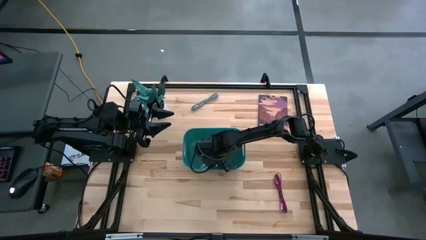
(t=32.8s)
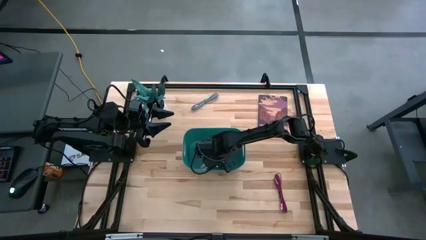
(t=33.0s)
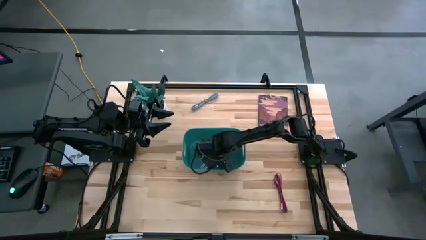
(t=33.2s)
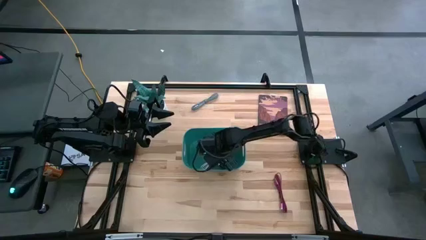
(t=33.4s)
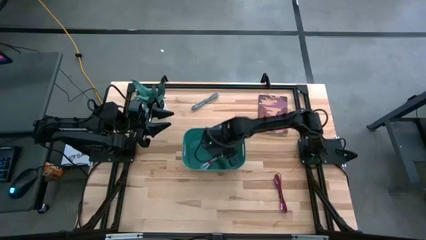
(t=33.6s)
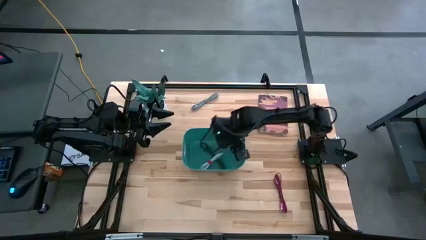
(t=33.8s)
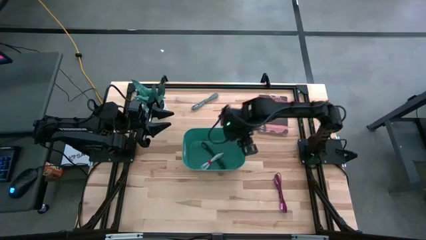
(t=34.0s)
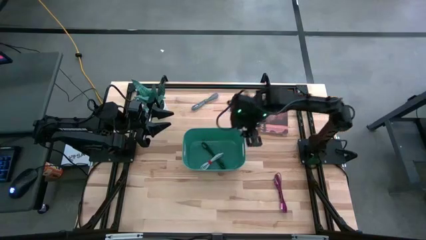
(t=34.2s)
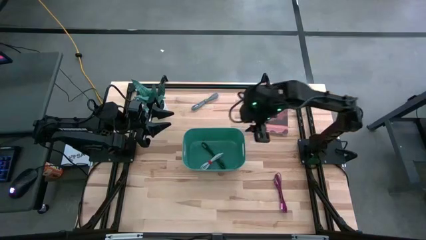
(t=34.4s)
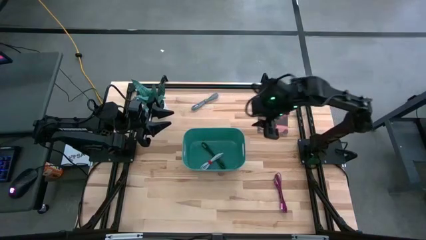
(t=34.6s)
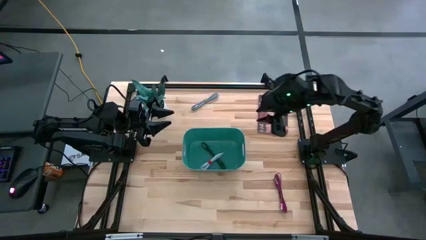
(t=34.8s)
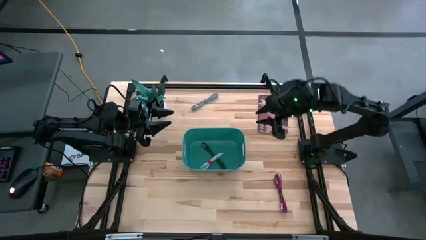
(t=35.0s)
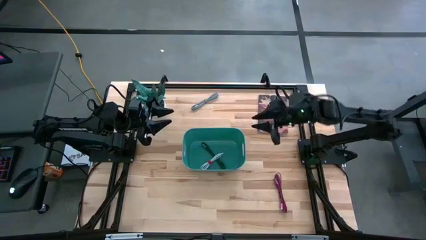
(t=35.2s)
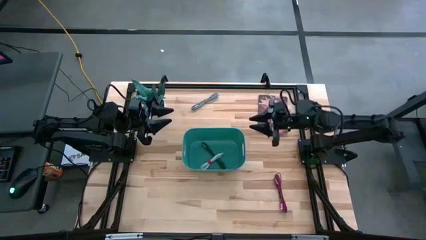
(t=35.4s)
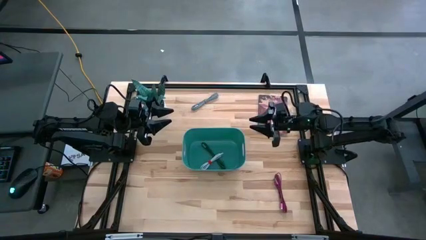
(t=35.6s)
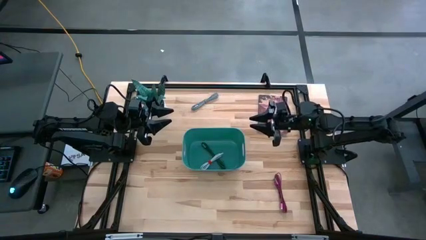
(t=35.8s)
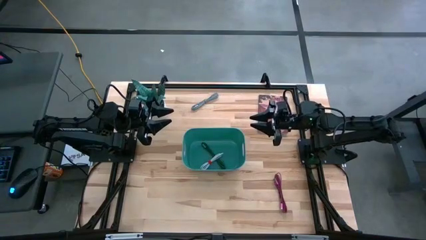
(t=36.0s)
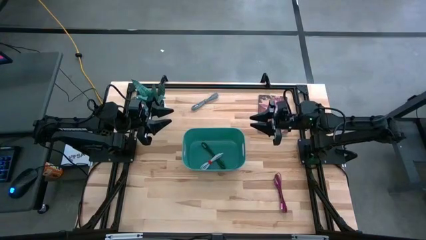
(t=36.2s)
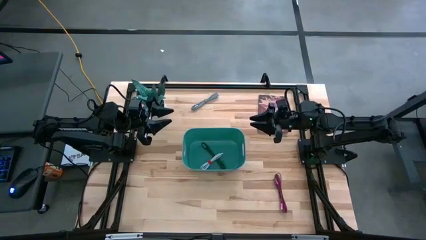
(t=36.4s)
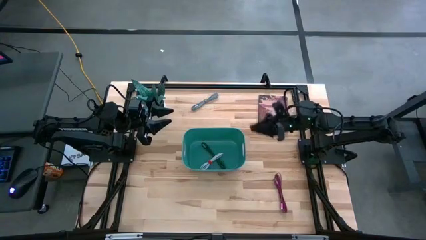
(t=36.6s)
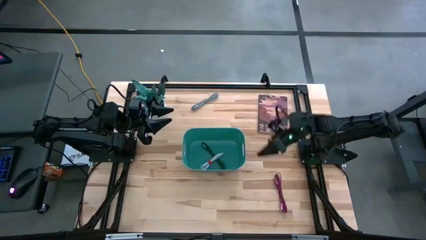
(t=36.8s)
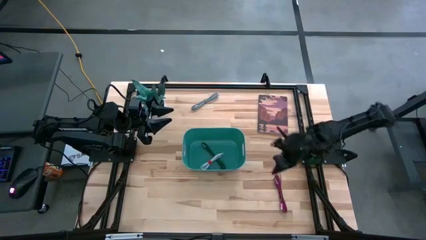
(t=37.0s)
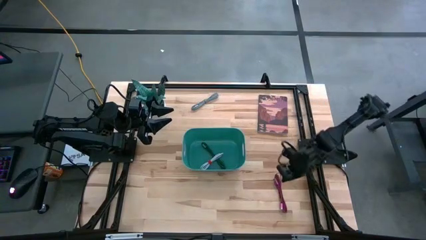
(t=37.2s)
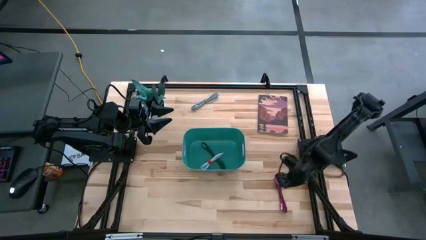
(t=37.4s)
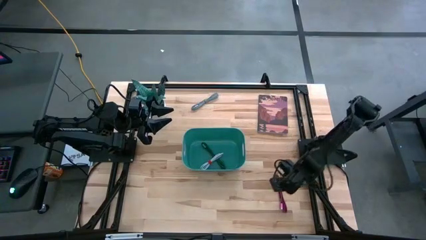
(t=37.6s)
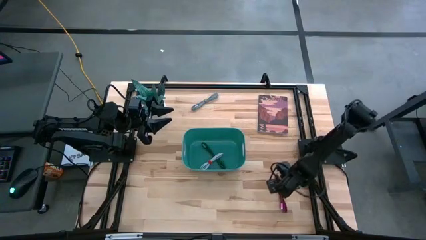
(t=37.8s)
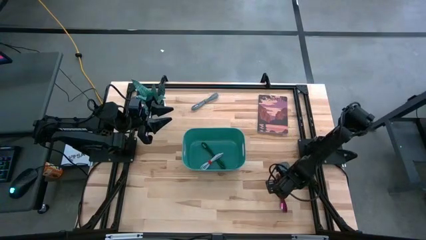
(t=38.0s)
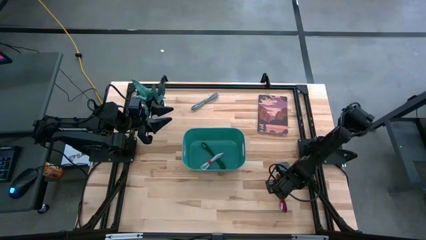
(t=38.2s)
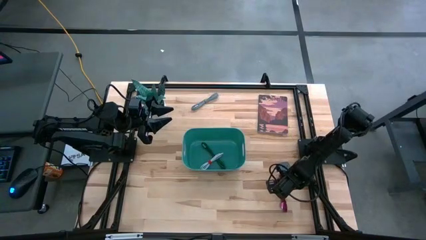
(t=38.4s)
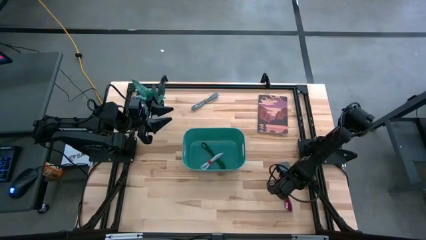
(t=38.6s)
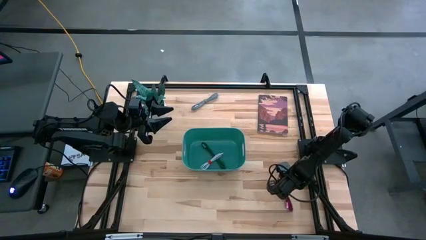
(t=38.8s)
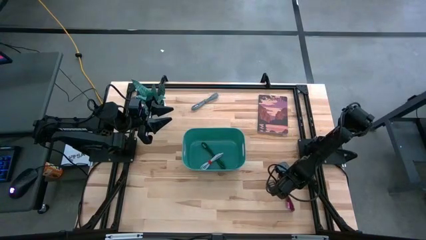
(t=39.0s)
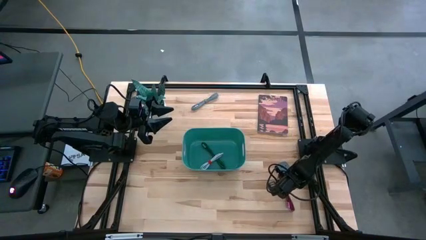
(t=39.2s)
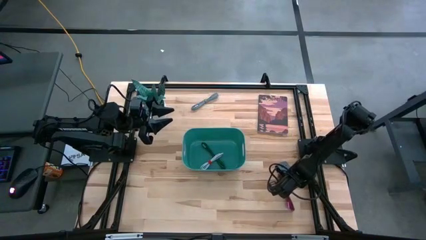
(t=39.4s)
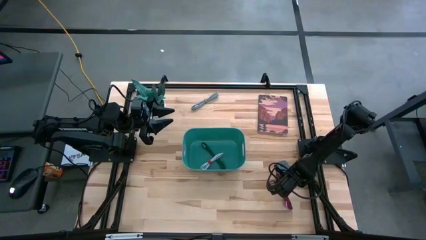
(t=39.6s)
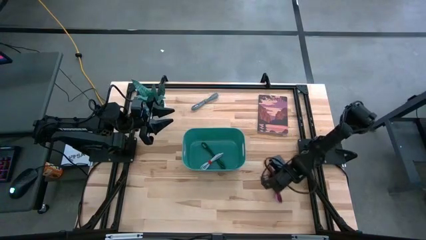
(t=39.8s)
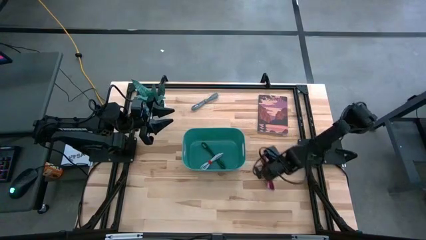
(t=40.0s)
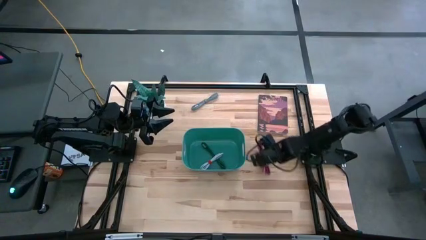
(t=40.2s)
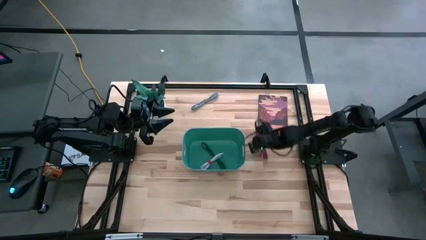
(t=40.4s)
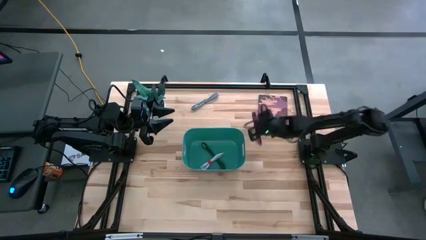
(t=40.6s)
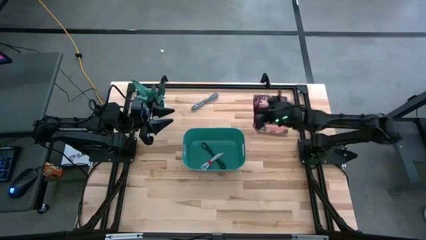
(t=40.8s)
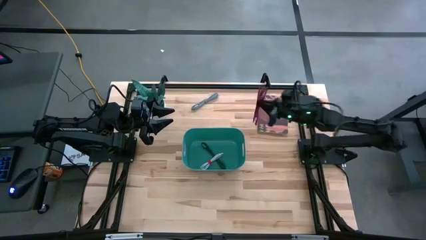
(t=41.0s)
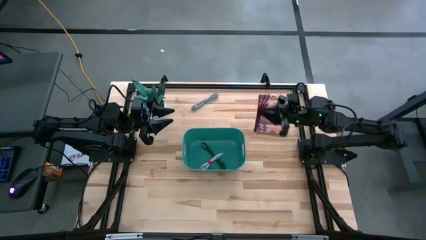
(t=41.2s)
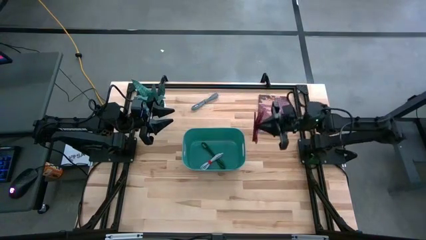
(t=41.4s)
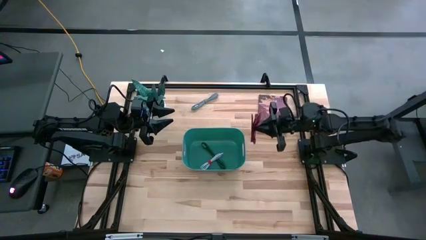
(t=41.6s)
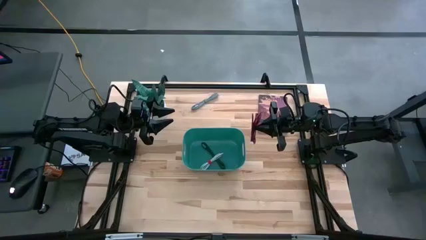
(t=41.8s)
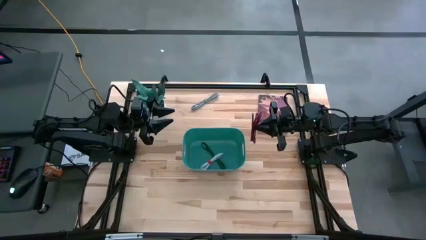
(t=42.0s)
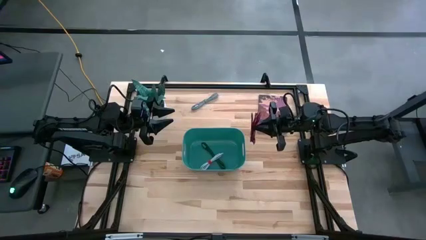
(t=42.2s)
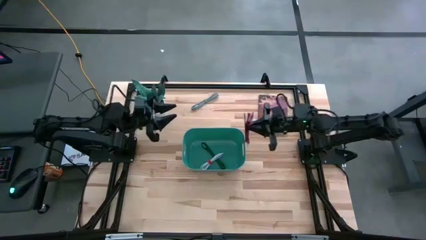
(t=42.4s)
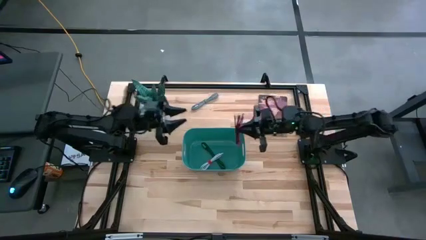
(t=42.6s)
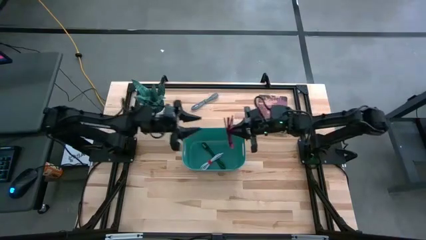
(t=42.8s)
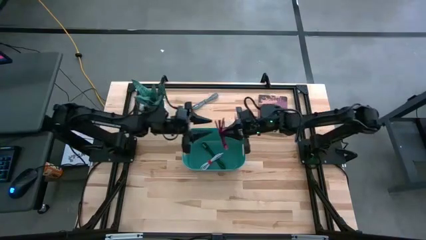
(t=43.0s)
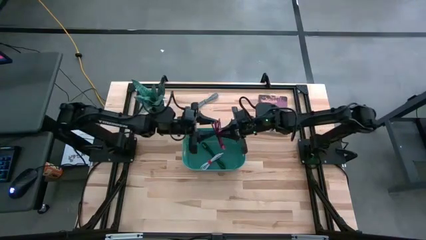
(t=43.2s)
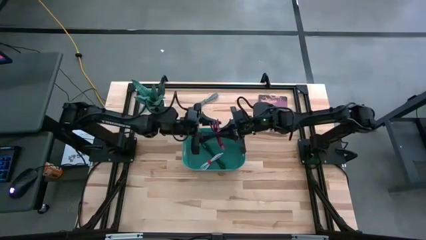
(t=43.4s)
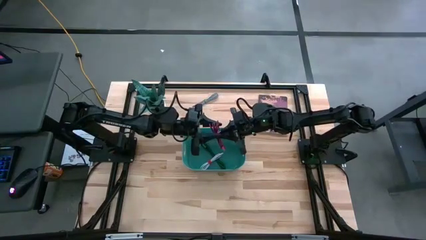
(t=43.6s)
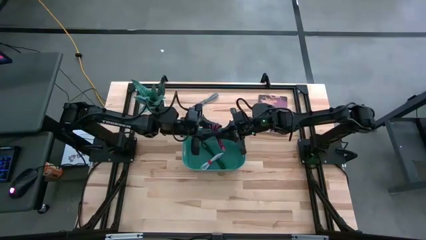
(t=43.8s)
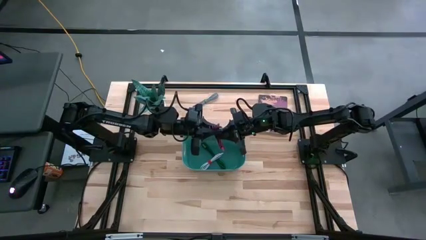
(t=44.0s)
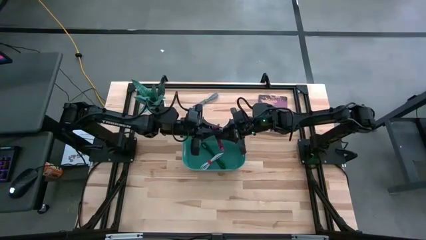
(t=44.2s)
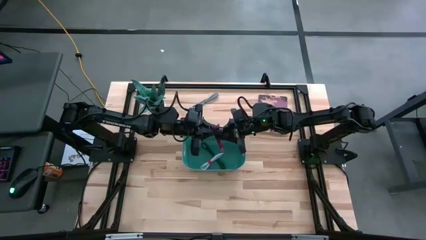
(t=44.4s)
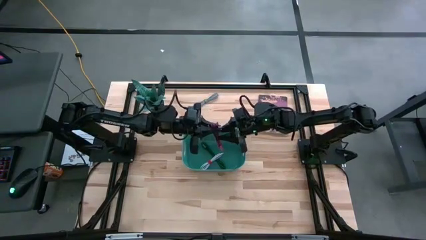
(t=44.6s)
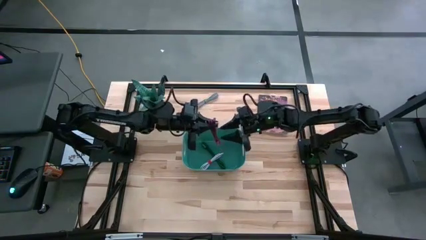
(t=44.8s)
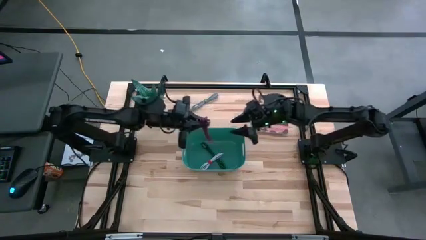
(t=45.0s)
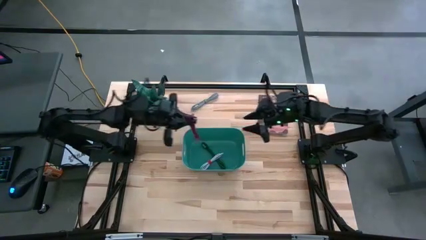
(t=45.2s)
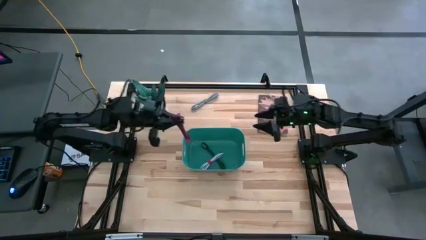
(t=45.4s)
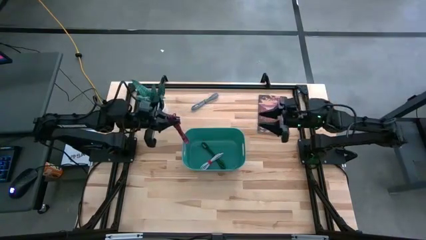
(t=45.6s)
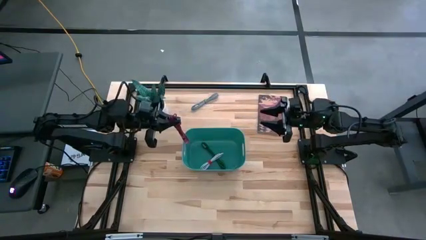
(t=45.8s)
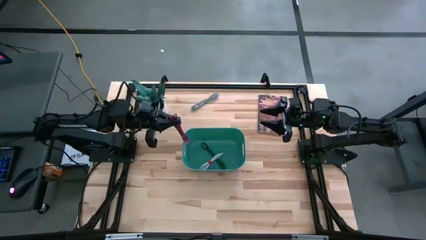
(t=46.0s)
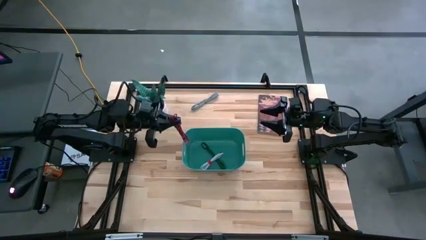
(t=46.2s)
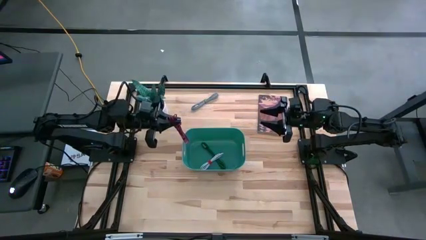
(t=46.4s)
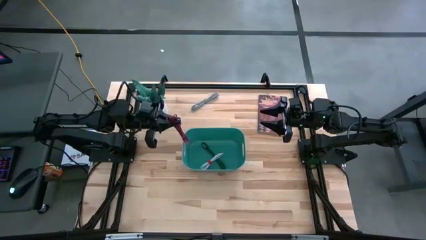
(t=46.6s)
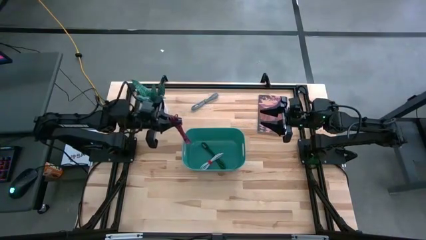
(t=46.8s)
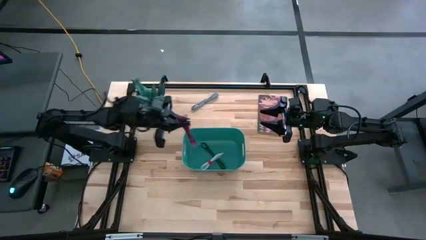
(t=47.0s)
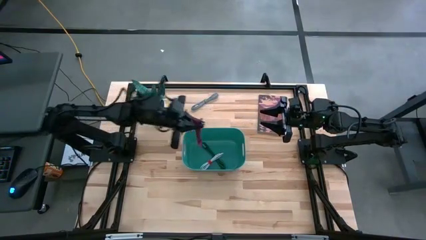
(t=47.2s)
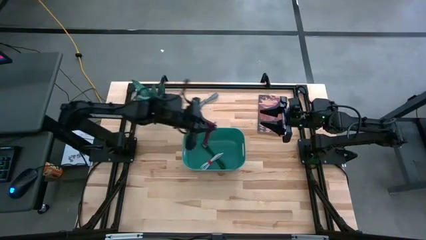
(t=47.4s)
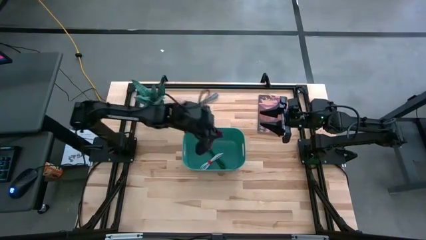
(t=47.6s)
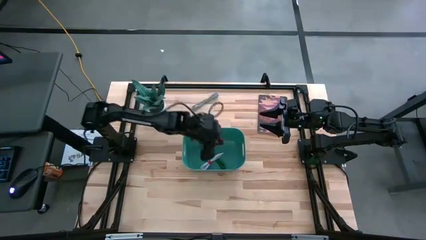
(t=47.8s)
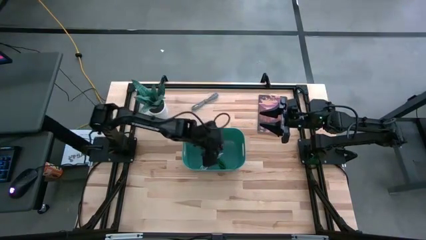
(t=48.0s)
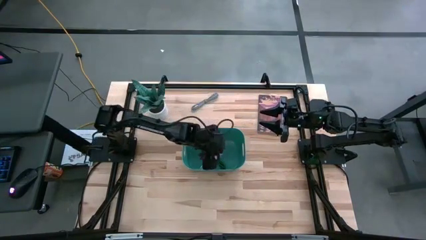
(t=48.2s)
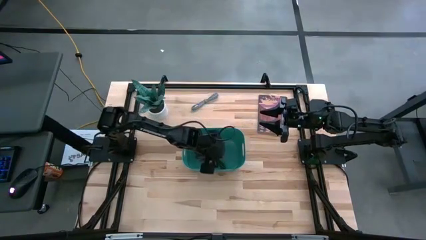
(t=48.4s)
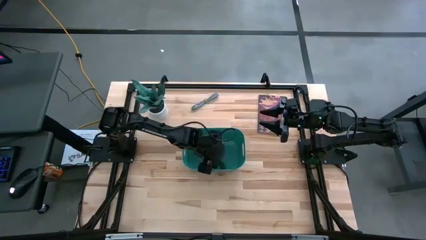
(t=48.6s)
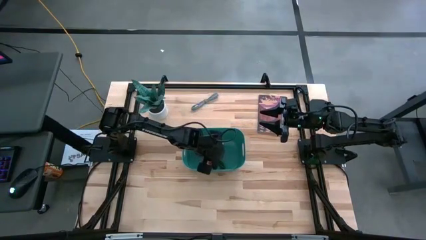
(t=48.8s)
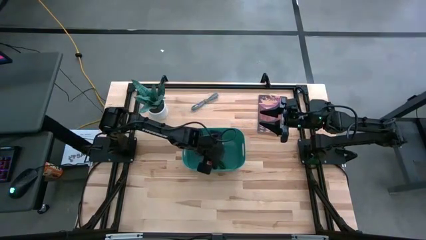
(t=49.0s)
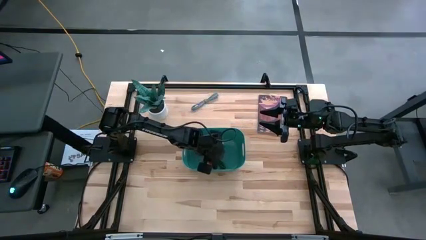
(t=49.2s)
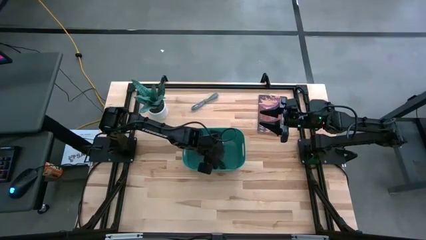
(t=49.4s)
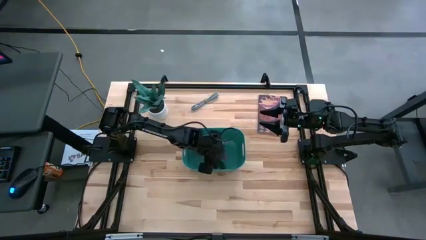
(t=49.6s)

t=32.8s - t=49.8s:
Task: Pick and place USB-C Cables
Put the pink charger cable into the green bin
